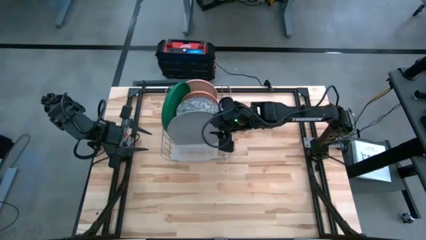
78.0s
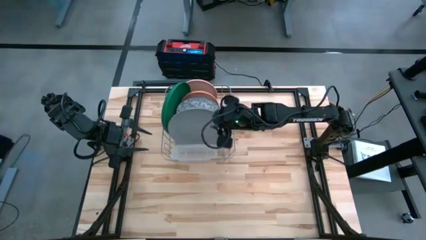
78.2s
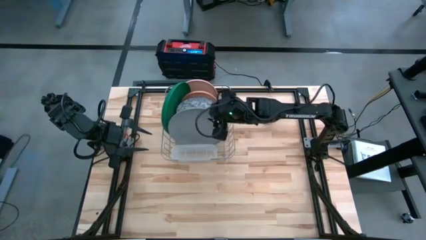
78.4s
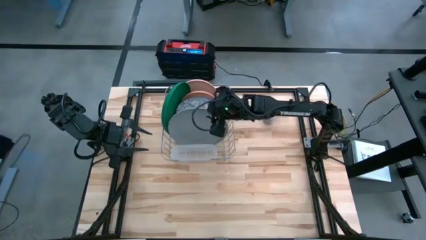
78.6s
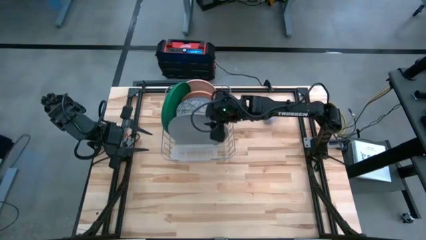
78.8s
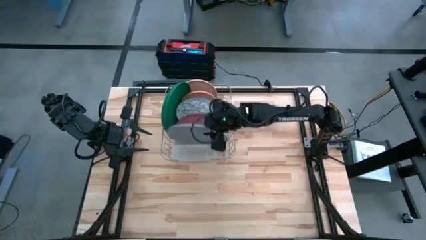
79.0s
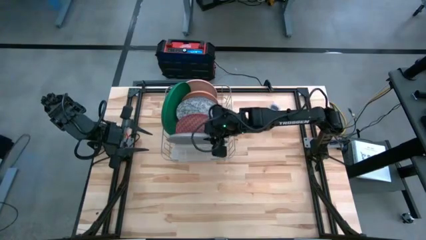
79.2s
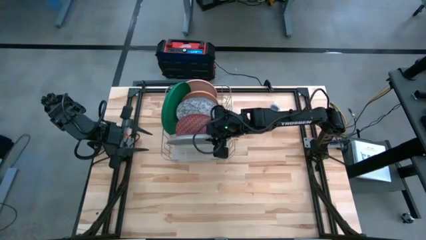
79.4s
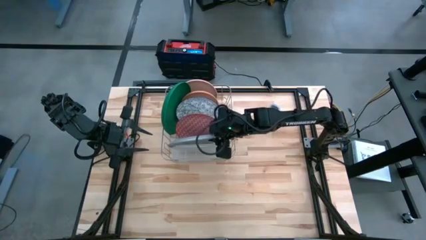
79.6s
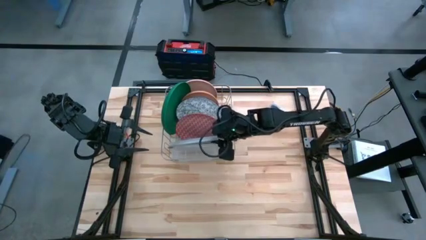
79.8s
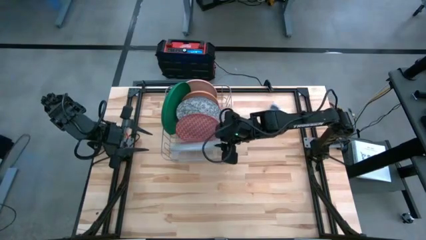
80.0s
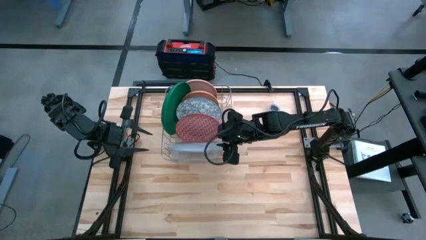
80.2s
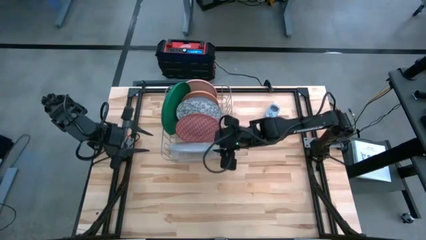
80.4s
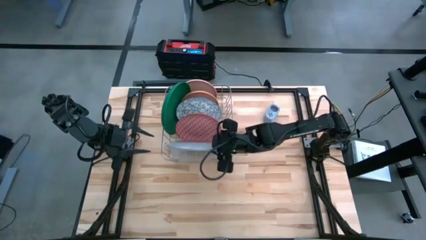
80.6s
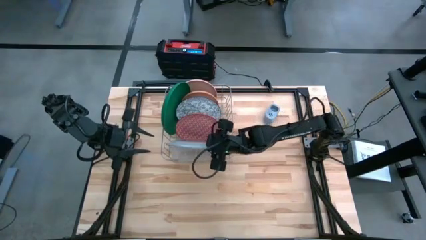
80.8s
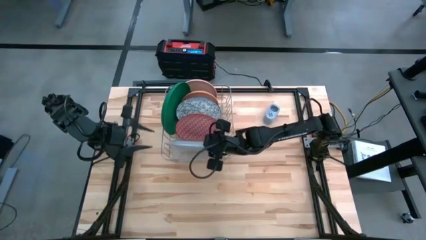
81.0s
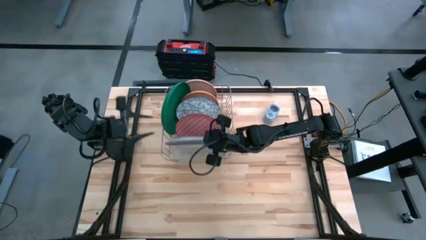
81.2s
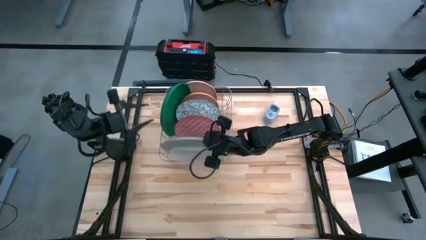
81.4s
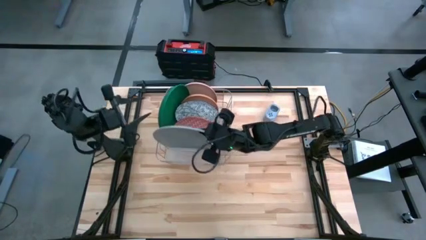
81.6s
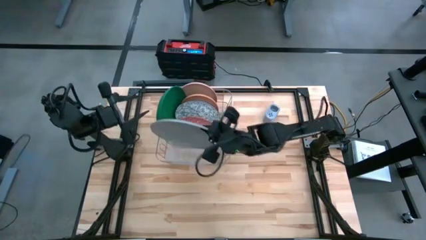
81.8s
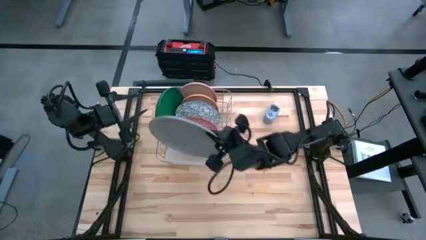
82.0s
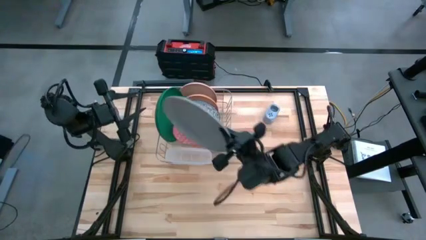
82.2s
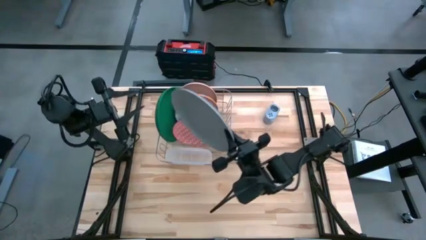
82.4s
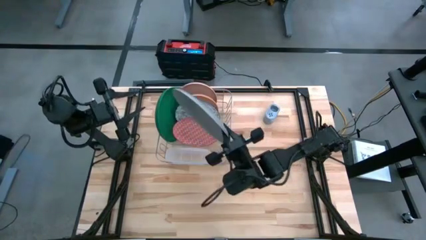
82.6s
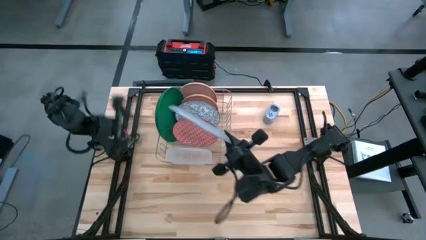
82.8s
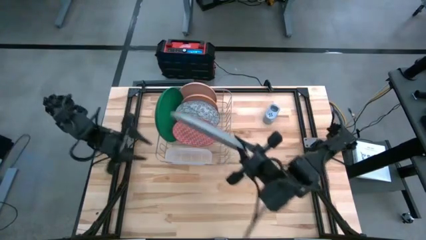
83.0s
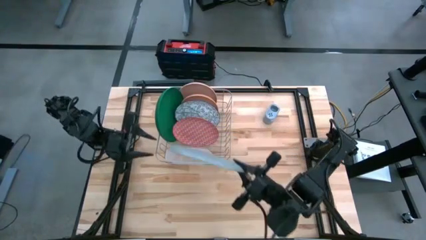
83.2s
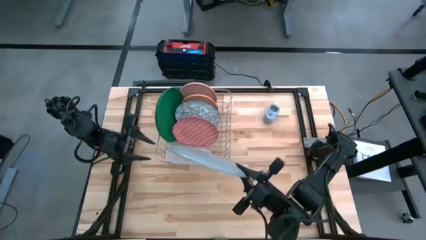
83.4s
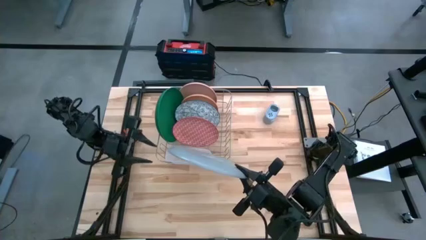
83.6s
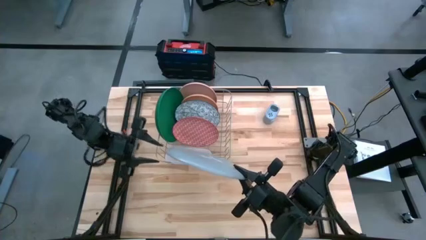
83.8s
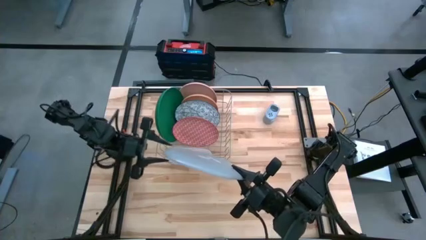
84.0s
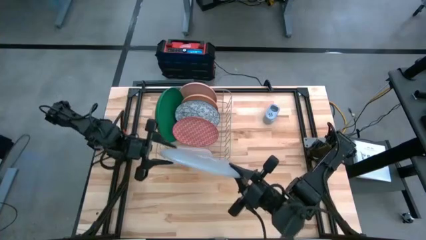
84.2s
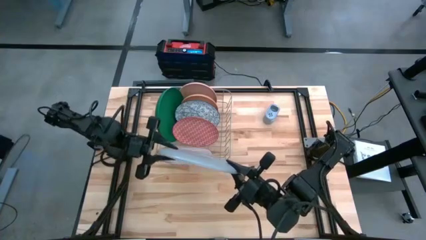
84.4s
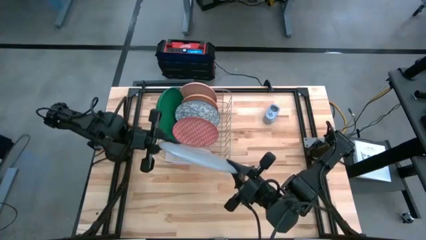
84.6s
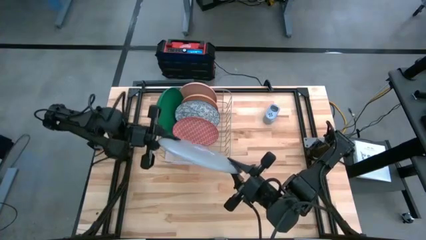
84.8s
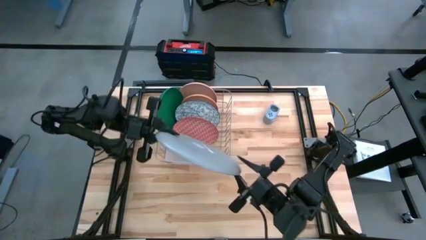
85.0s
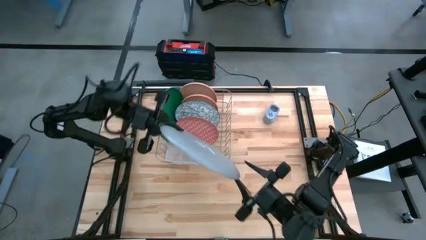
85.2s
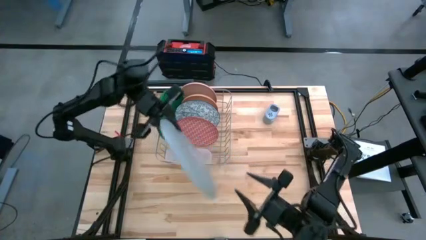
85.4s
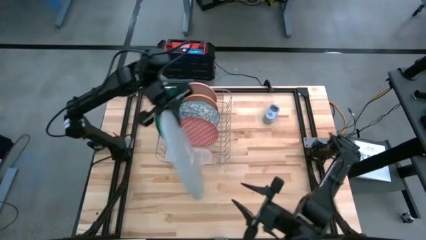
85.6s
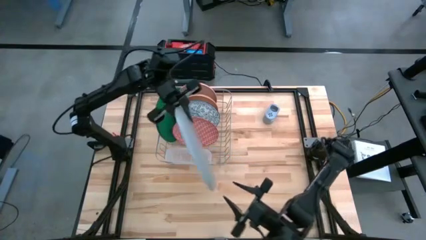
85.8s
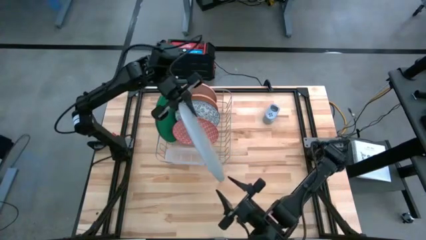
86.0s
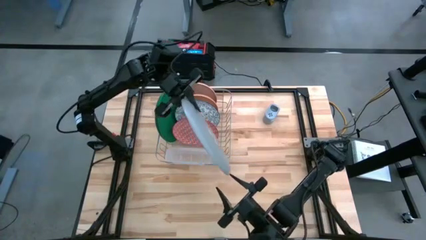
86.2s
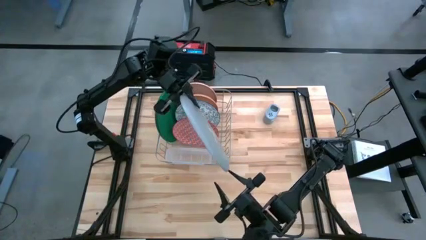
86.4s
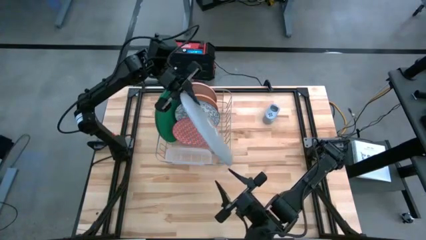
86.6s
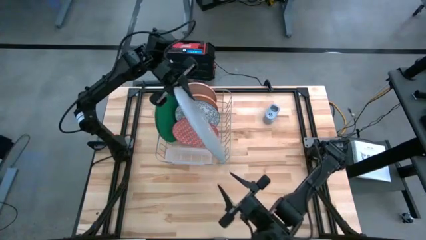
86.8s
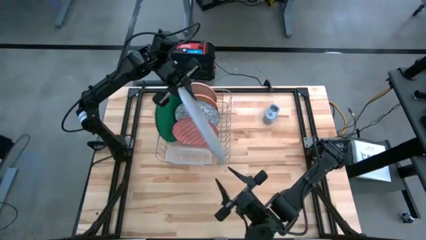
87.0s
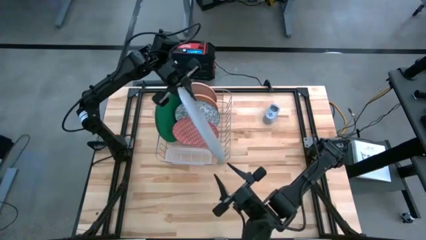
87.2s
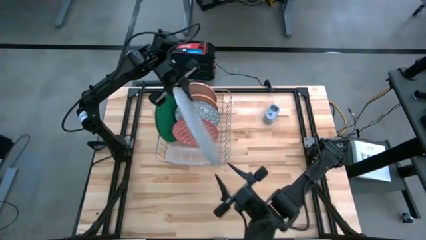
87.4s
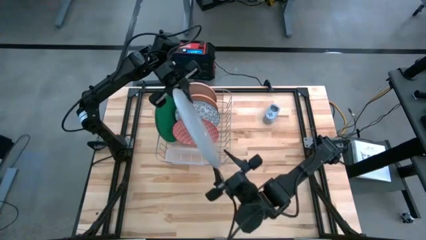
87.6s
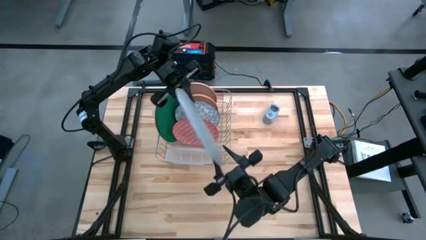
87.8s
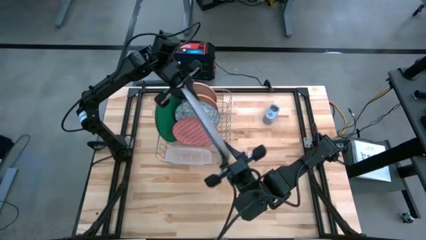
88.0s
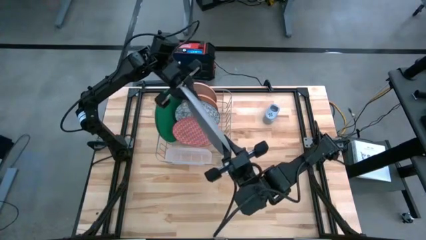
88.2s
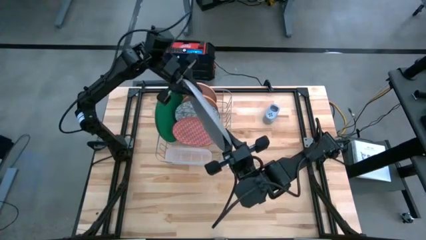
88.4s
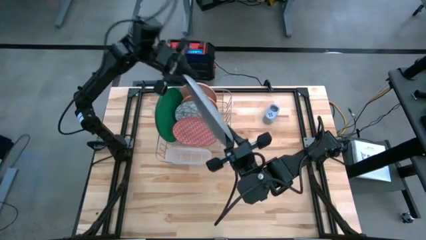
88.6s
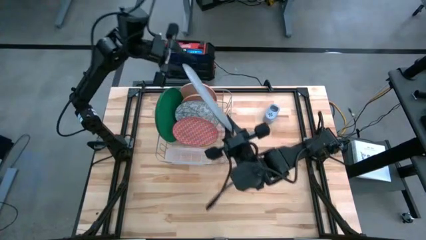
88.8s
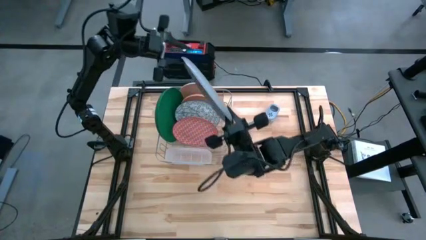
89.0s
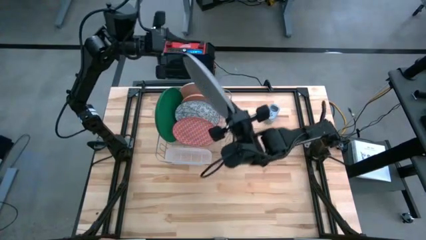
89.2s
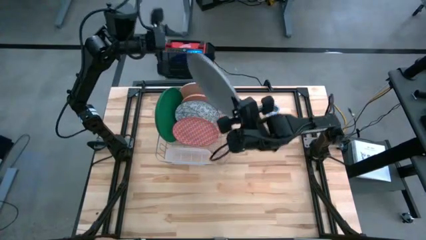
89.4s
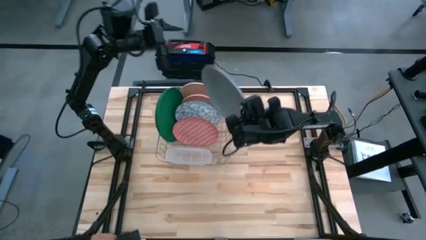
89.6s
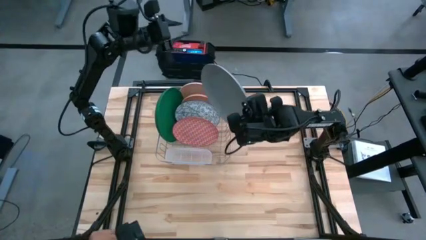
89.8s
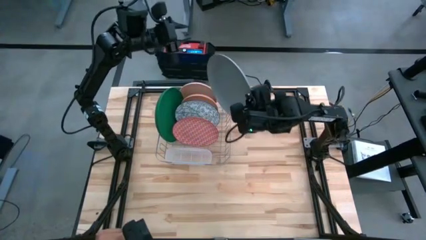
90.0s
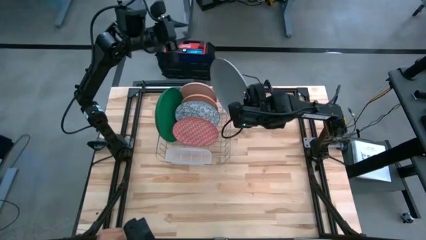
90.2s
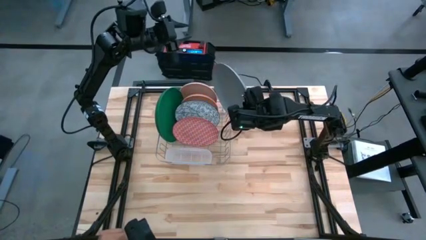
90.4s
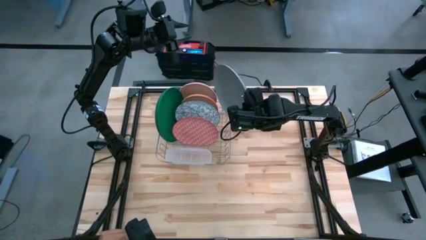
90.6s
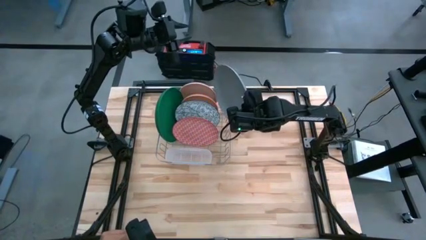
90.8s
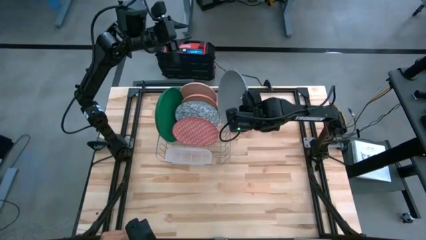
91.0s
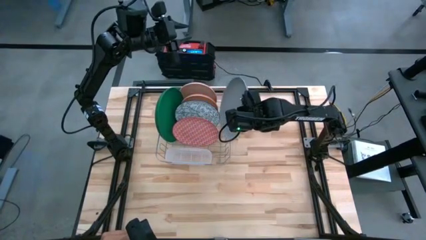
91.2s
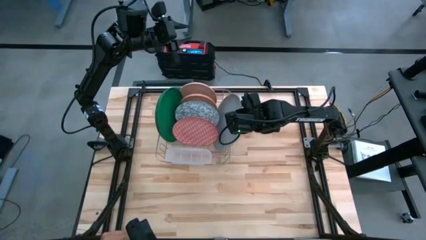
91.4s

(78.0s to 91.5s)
Task: Sort dishes
Put the gray plate in the dish rack

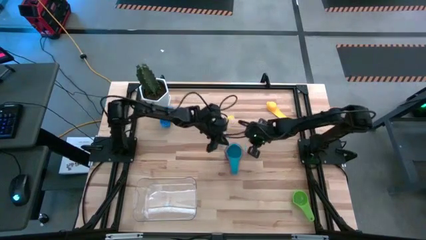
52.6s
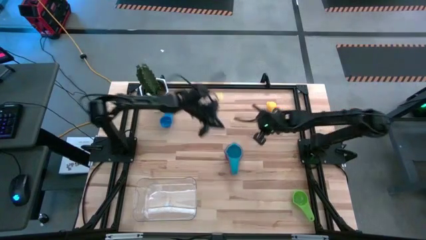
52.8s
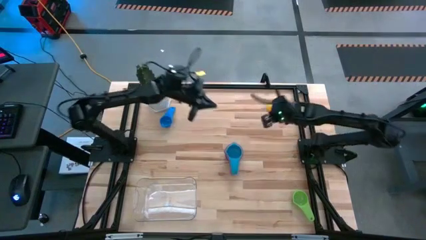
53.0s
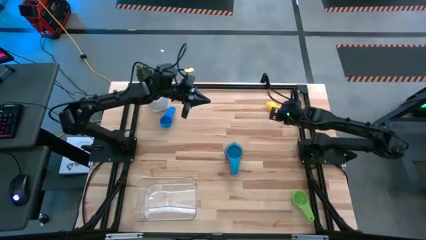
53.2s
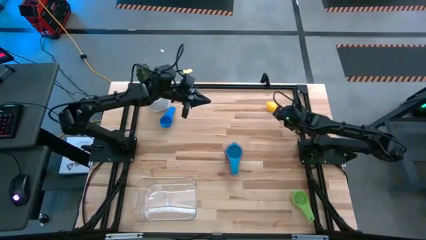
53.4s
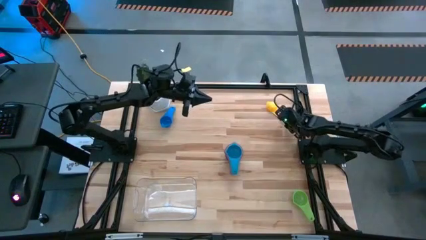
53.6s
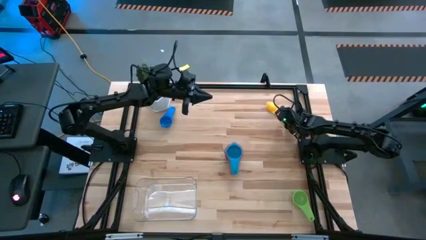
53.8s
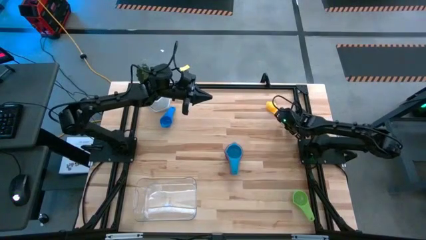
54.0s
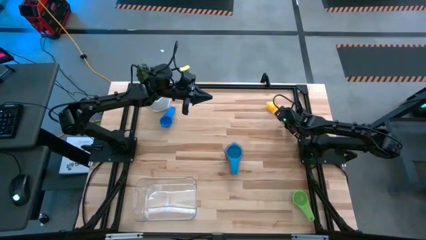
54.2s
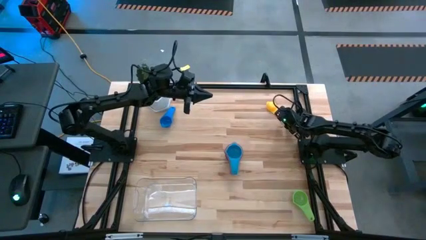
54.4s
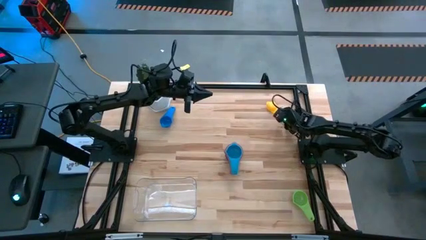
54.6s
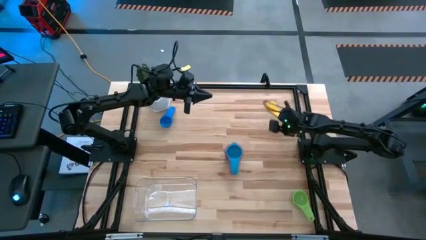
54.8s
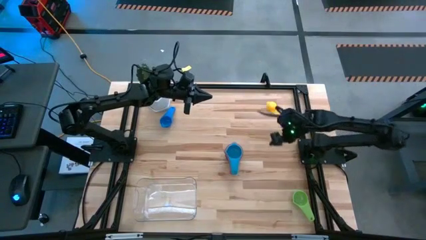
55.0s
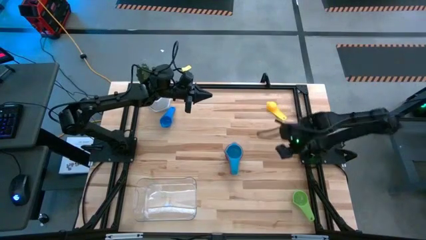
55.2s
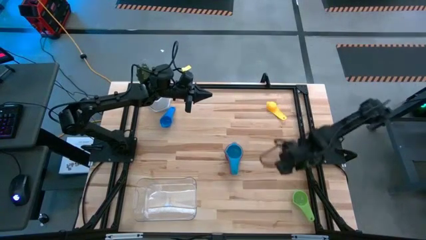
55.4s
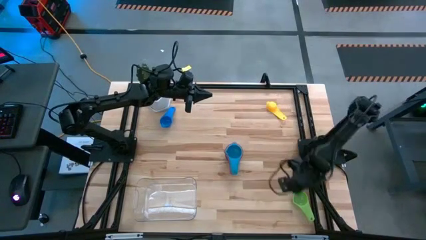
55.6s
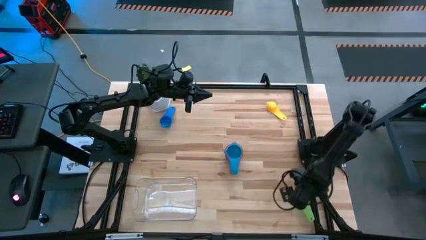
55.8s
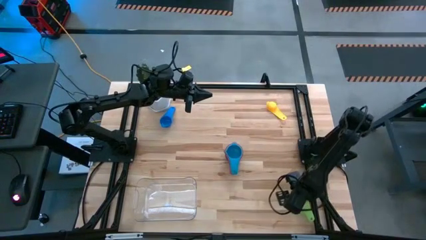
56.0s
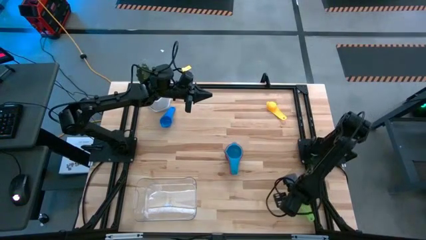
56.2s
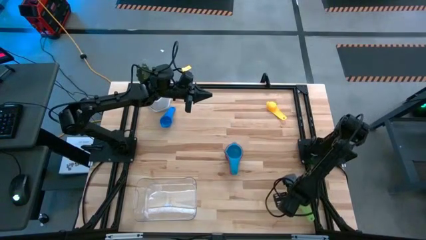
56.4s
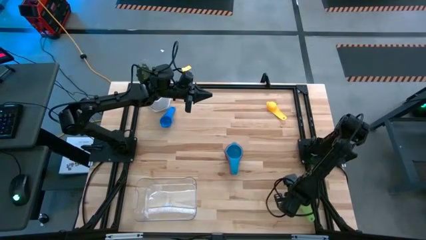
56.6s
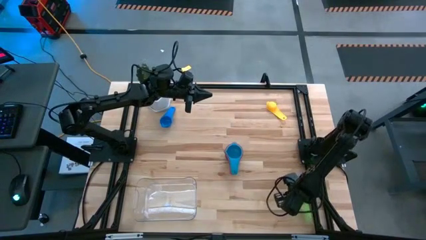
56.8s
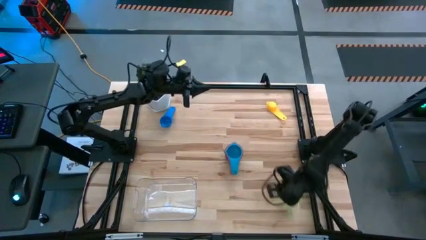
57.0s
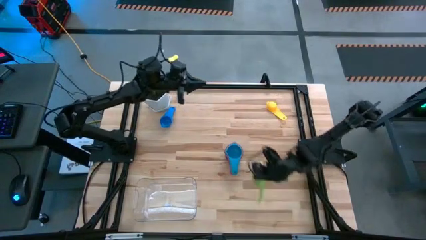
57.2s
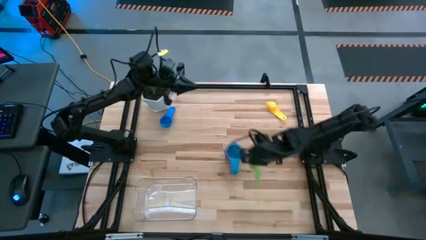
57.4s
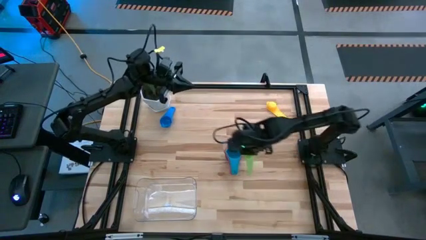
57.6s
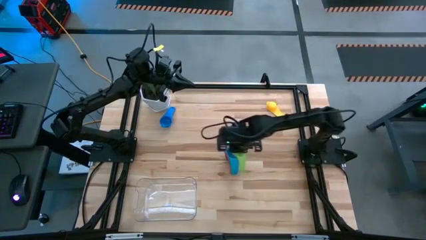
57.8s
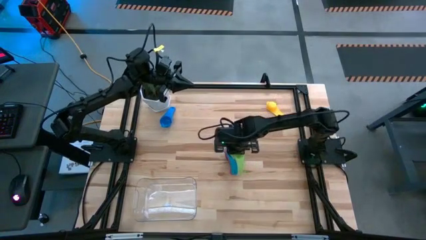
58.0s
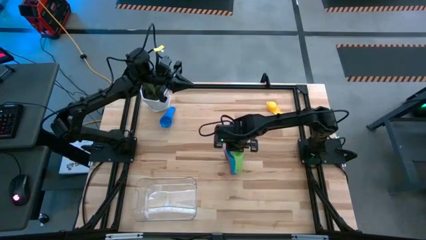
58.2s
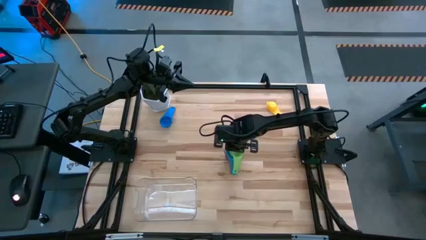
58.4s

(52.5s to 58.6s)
Task: Nest measuring cups in basket
Stack the green measuring cup on top of the light blue measuring cup
